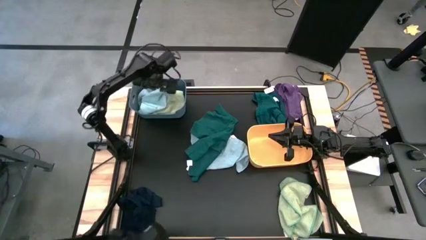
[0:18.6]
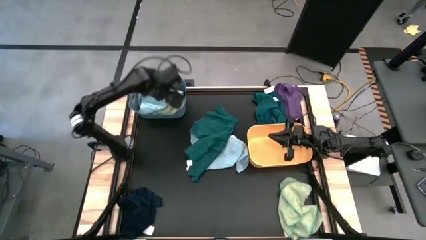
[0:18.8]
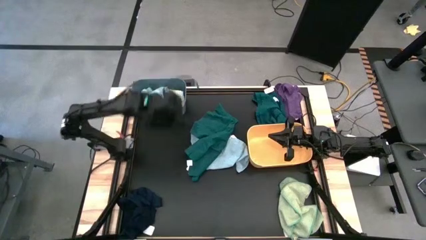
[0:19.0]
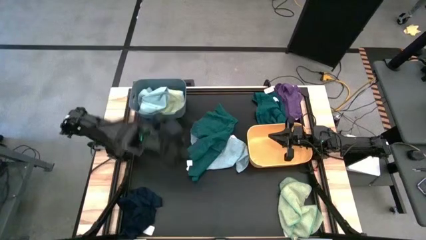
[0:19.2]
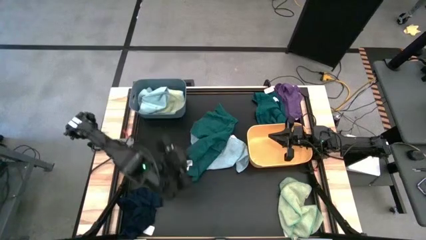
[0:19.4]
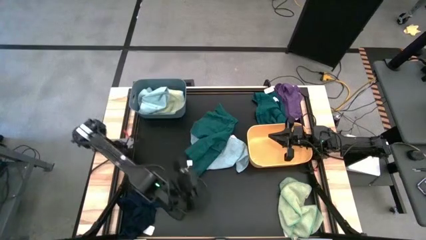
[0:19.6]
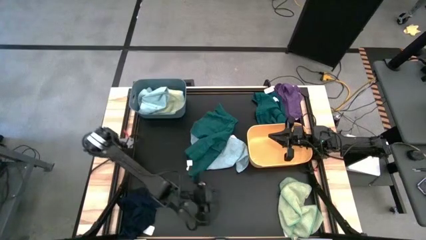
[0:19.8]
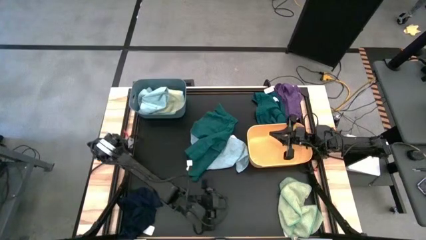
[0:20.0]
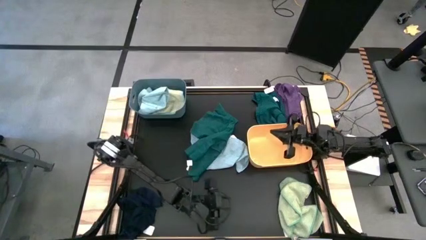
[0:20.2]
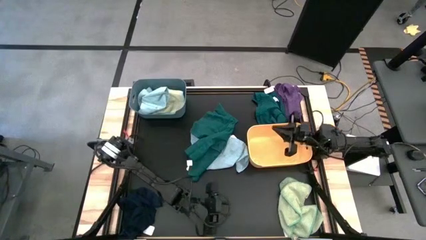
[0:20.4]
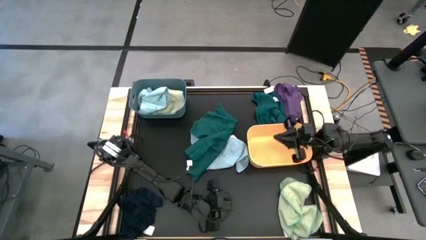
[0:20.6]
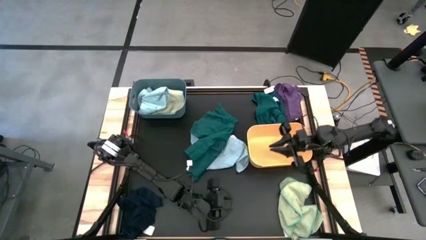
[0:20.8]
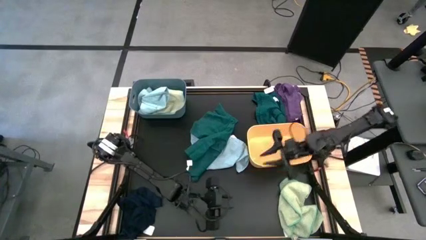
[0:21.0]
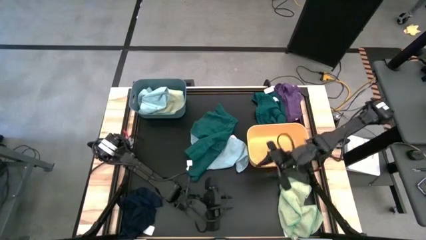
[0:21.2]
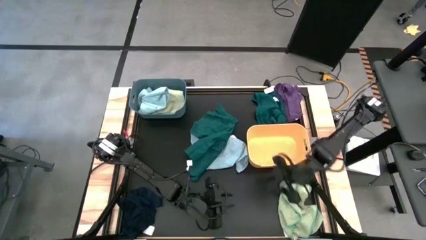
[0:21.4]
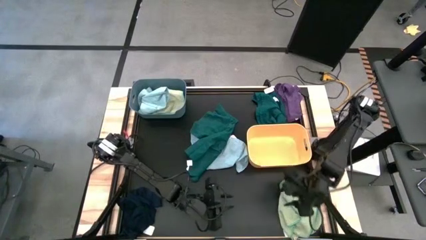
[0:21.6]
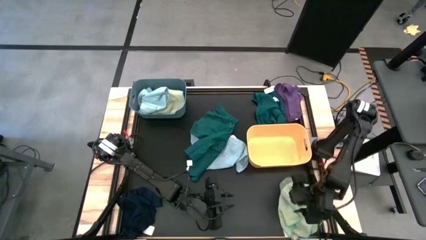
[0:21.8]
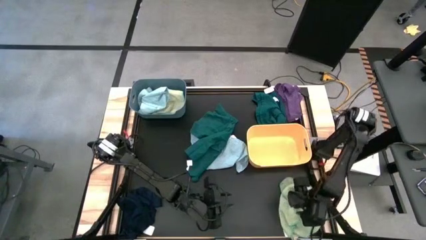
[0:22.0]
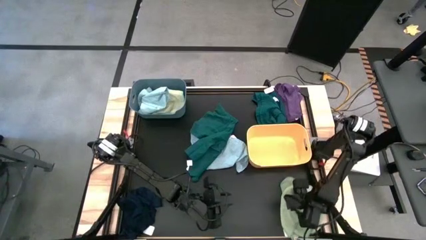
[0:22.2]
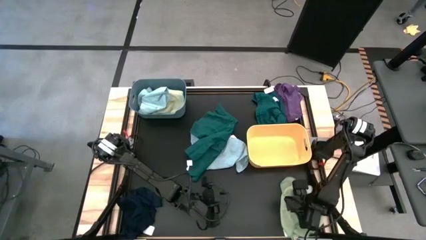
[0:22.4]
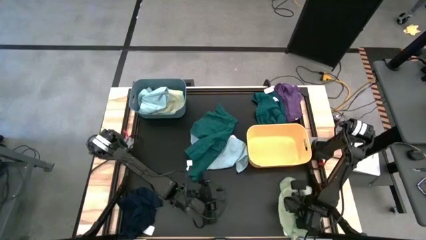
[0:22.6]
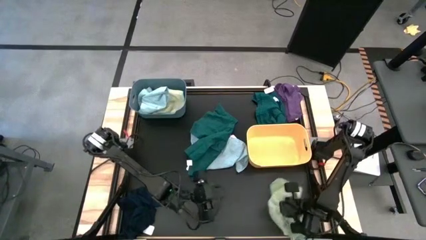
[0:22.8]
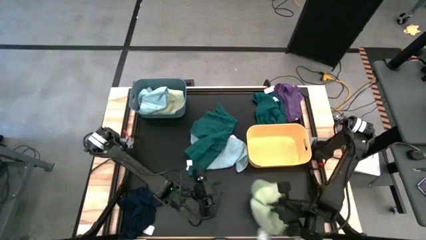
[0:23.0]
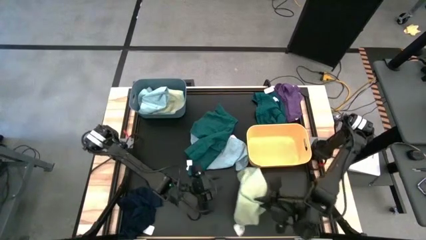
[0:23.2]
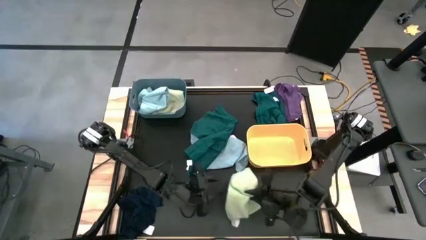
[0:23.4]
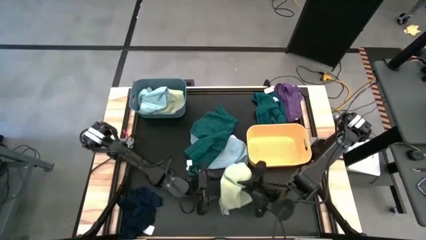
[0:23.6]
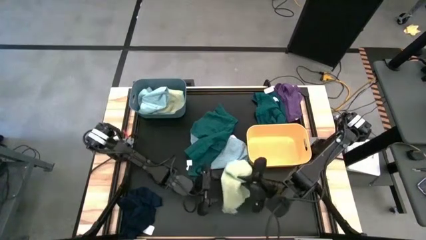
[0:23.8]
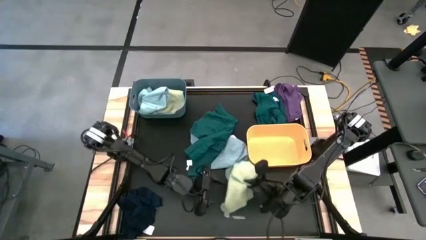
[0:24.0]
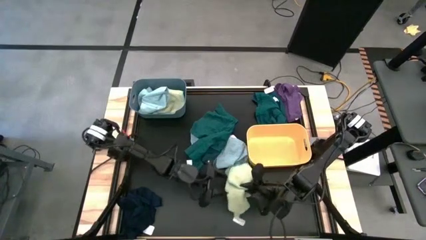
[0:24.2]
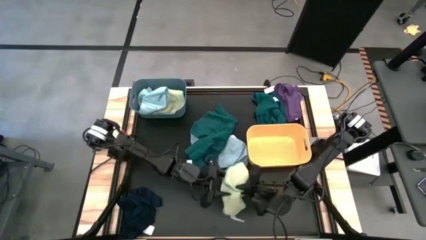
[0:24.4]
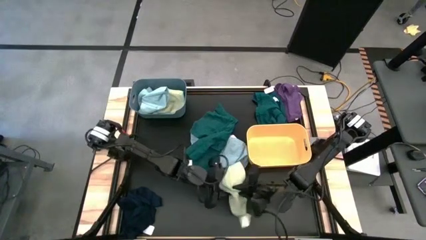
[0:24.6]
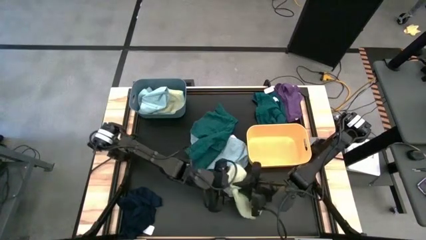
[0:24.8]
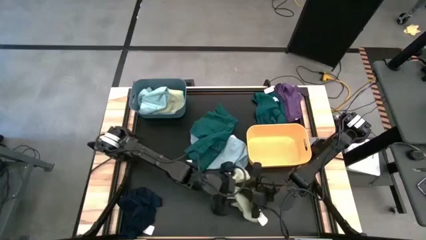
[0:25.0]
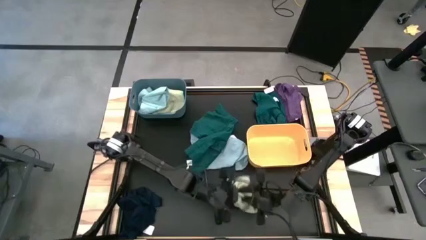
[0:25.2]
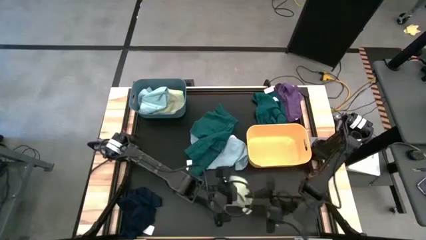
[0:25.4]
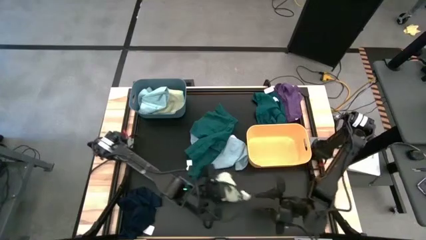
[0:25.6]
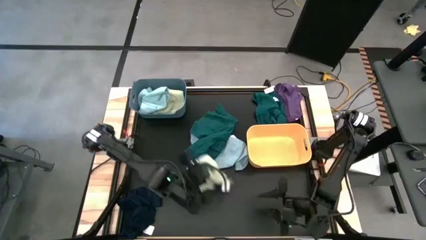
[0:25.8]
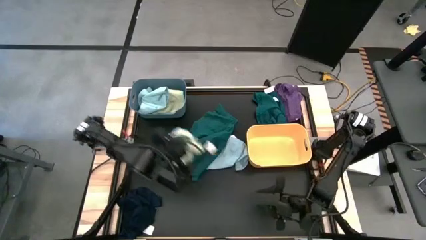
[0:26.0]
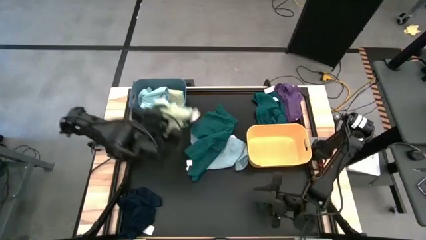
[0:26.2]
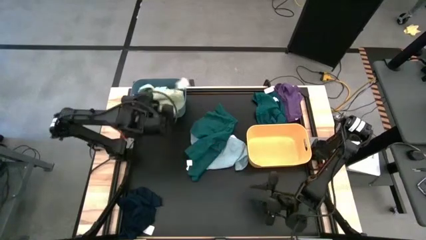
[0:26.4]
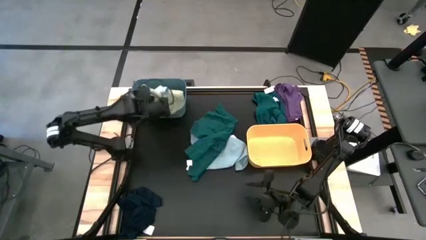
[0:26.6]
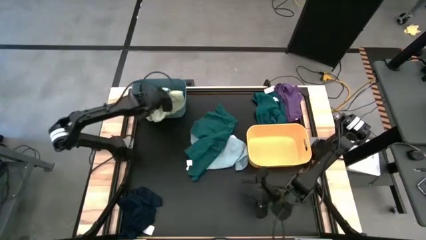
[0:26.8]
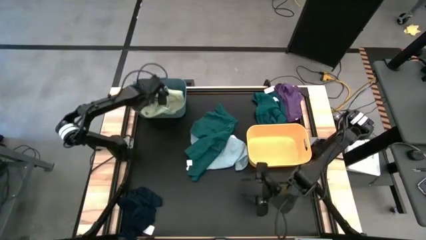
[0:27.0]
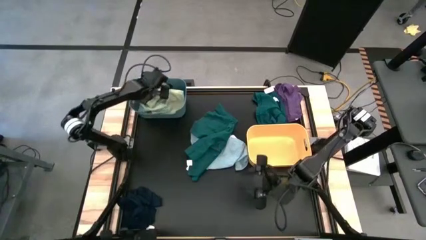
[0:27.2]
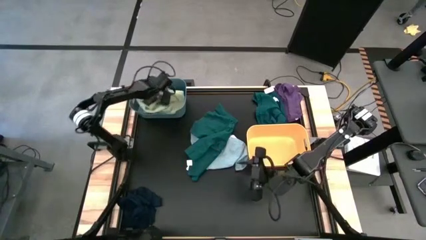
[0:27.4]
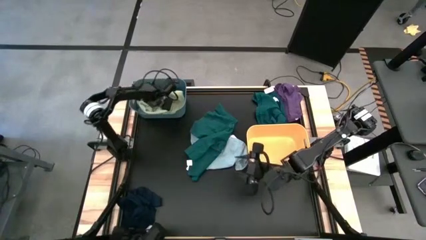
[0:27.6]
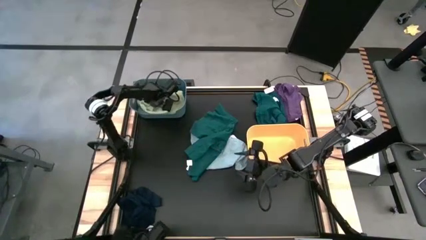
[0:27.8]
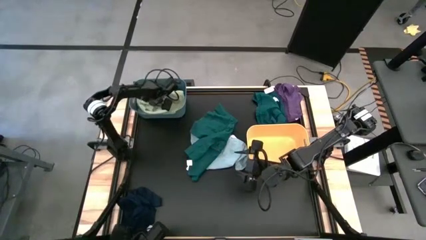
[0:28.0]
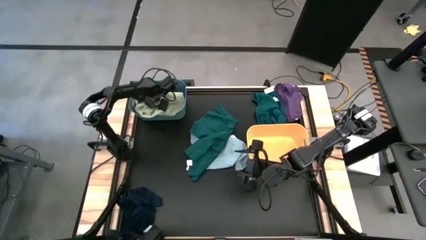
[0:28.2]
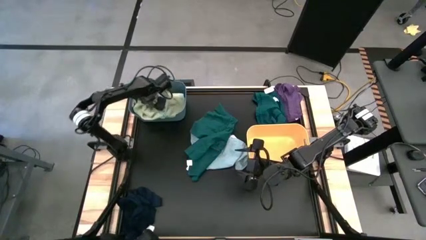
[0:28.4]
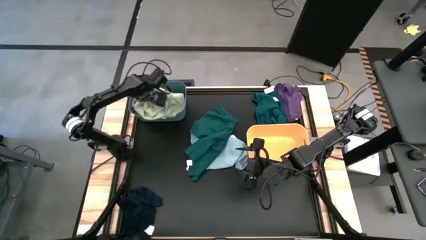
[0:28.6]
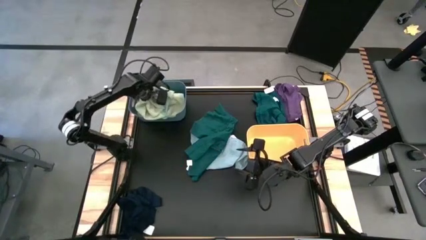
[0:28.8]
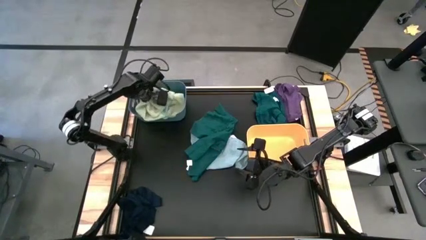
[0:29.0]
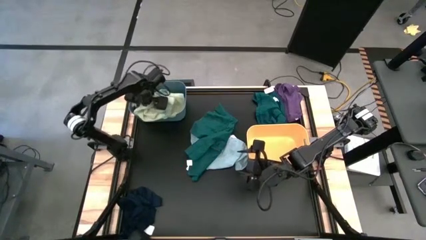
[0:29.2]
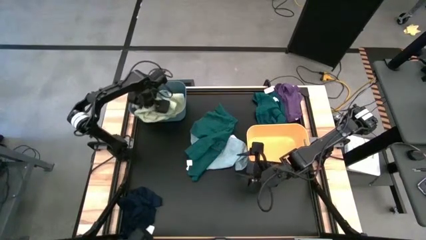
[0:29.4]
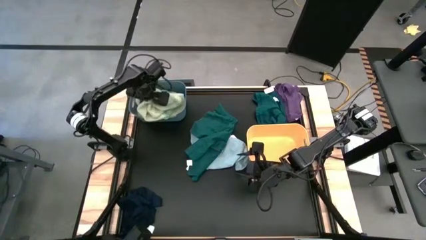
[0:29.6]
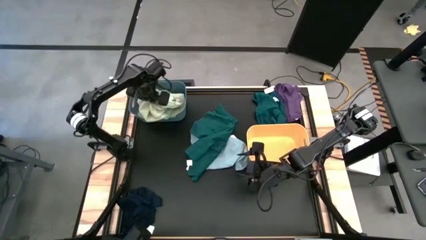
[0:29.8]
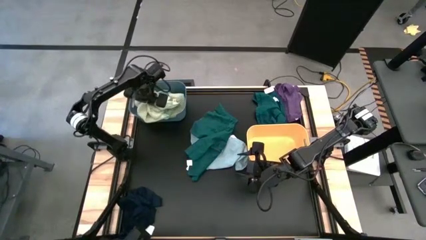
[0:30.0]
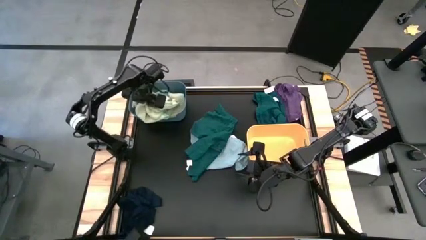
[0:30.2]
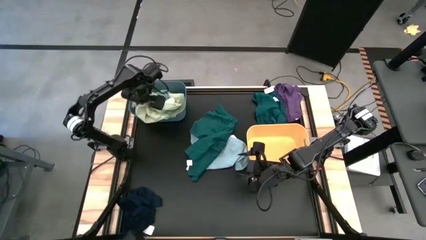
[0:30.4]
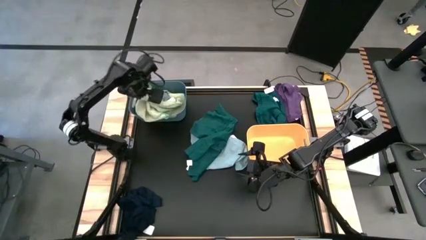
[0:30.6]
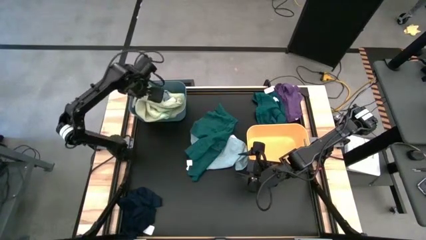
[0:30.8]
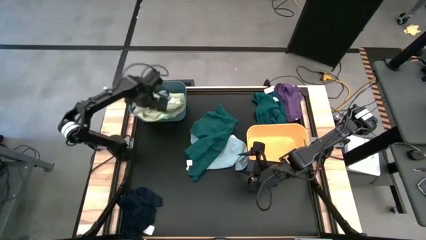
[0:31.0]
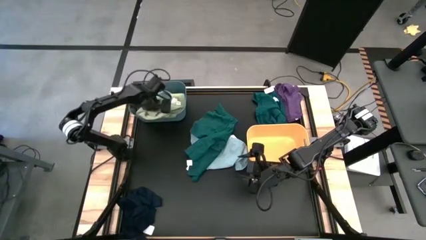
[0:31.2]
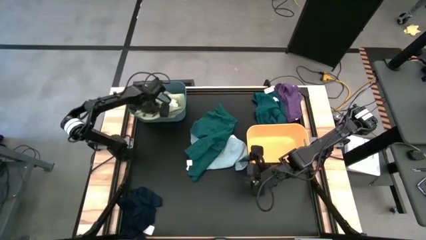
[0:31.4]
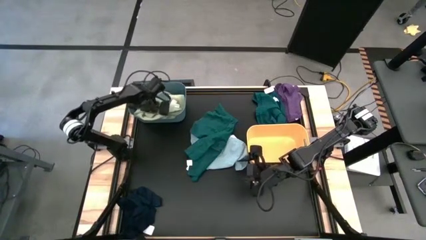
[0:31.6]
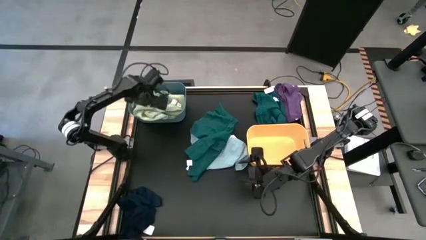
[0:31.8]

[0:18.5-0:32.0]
Task: Sort towels by color in basket
Put the light green towel into the blue bin

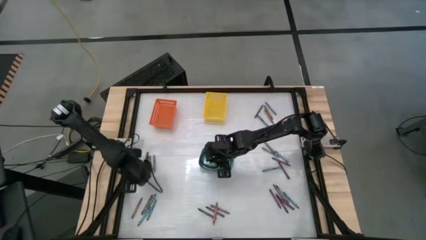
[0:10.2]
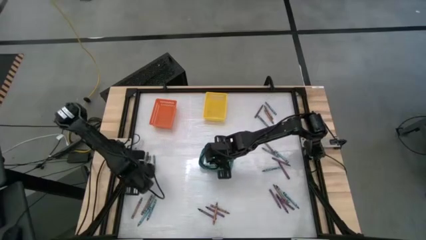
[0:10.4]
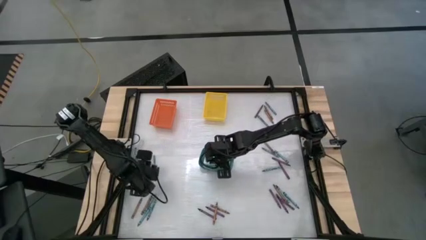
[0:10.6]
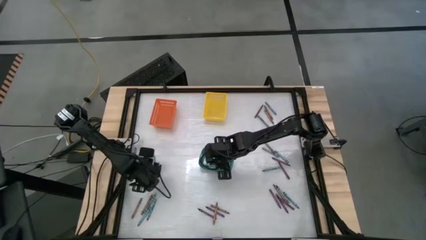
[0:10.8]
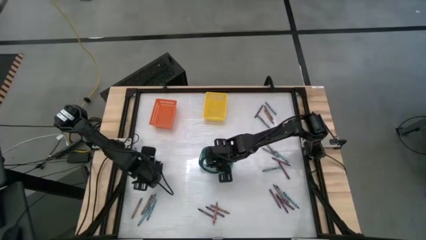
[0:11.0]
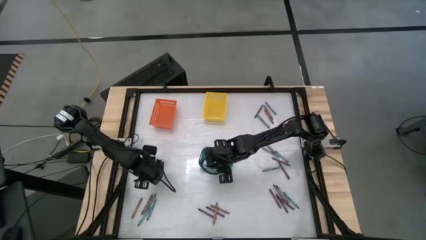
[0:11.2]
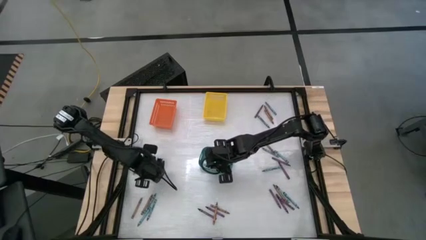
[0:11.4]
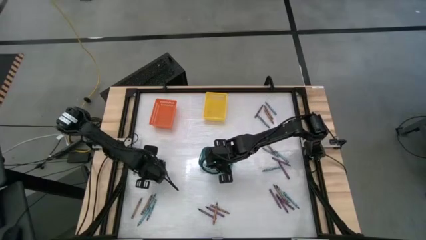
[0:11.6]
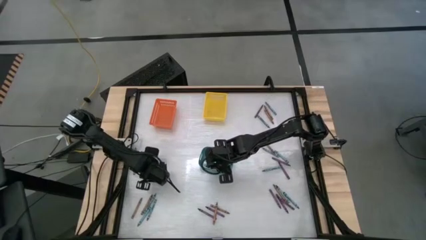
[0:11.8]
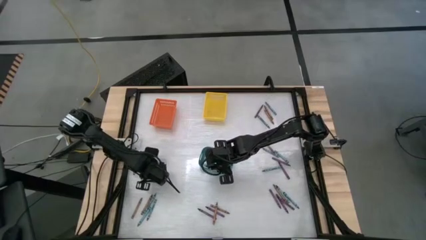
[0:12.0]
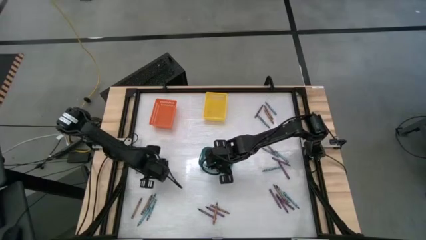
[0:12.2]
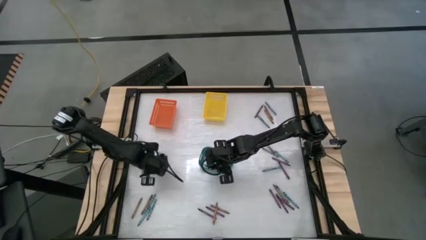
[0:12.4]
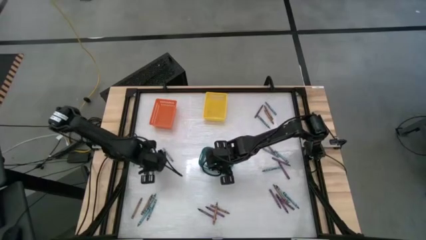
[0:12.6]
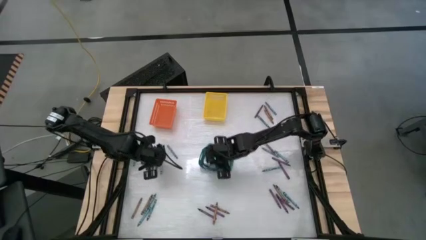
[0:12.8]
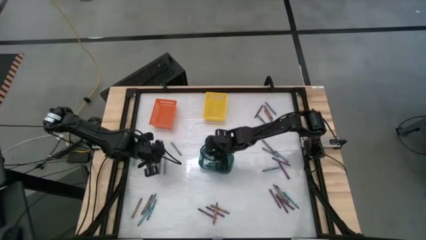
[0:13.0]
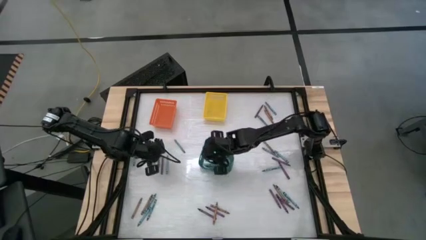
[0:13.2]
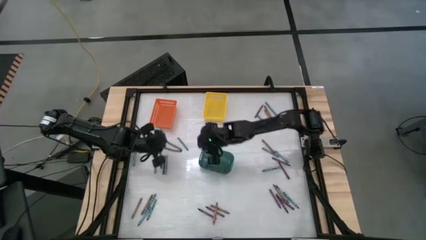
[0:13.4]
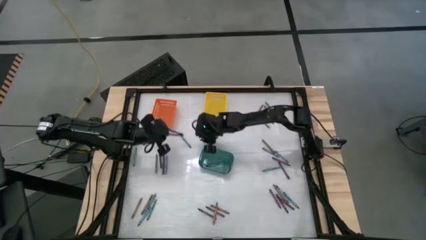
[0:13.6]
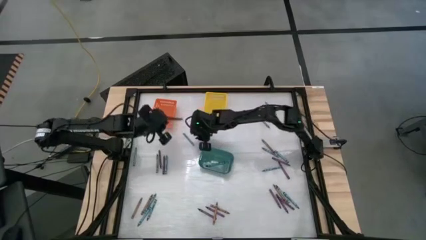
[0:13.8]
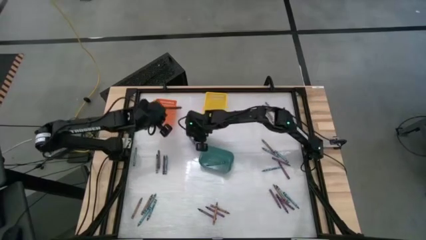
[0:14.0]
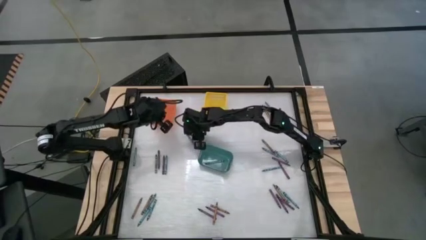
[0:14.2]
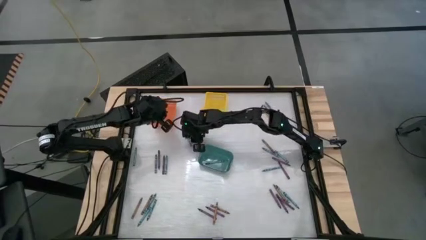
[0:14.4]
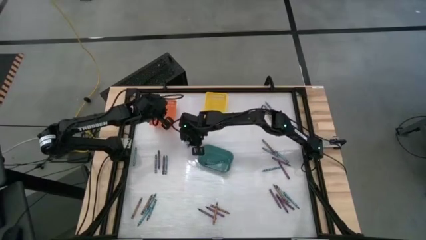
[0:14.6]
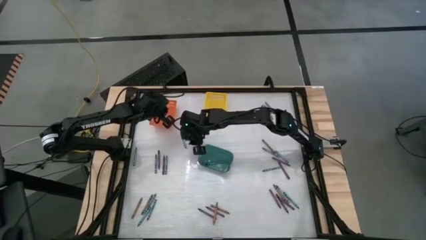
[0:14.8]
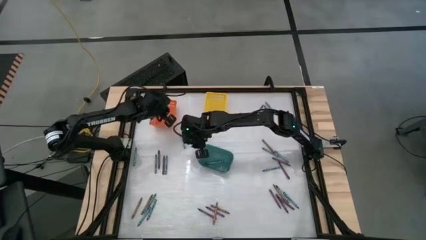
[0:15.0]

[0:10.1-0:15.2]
Task: Sort crayons
Put the violet crayon into the orange bin
